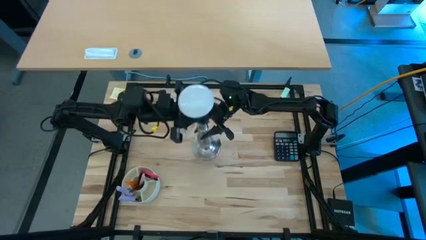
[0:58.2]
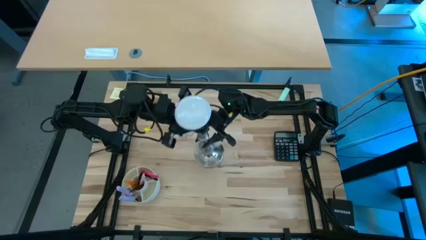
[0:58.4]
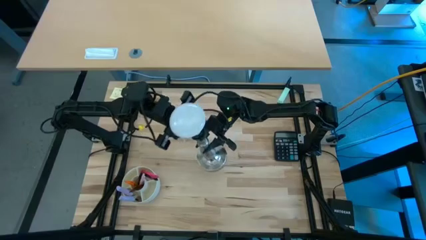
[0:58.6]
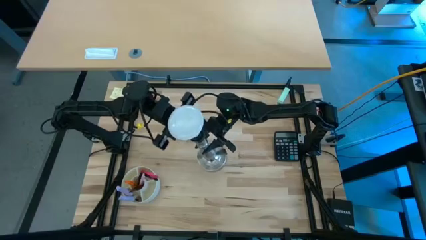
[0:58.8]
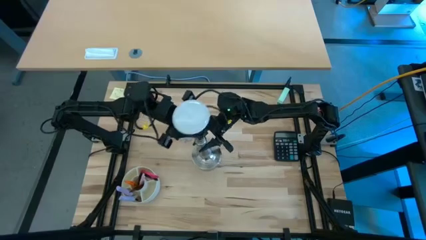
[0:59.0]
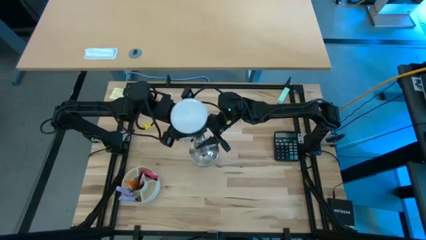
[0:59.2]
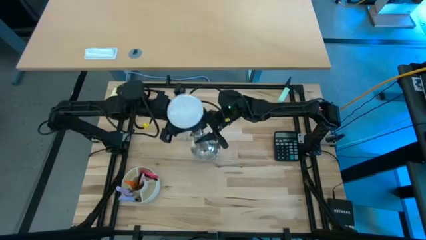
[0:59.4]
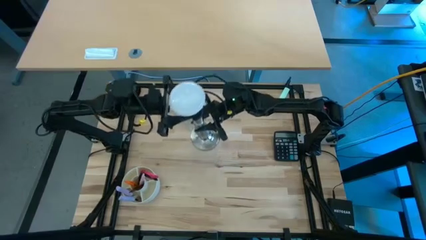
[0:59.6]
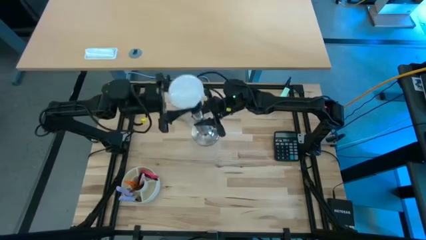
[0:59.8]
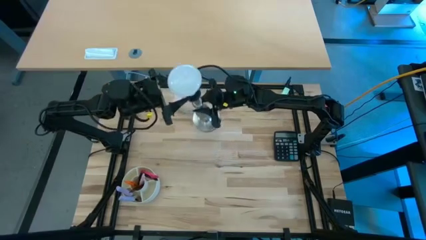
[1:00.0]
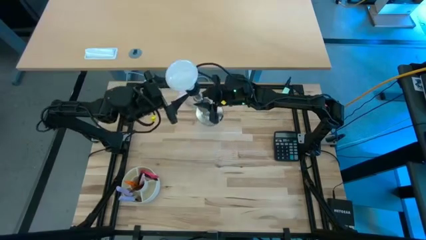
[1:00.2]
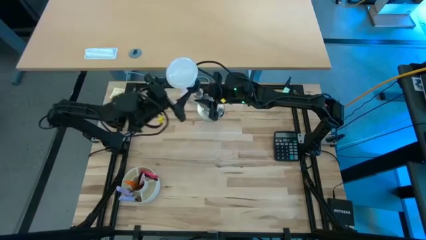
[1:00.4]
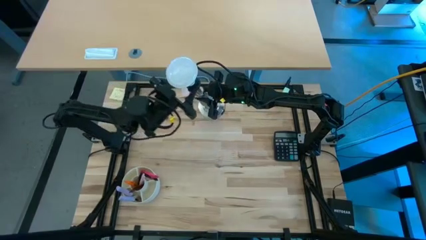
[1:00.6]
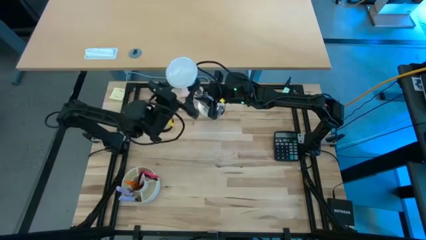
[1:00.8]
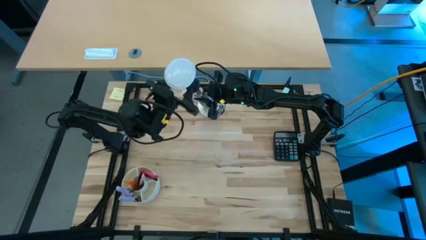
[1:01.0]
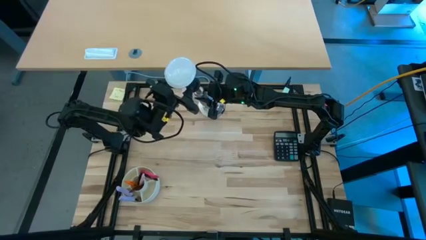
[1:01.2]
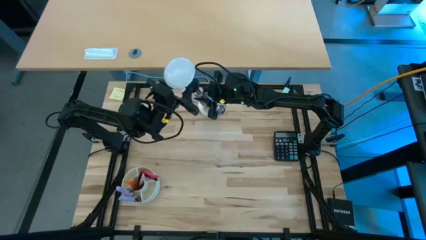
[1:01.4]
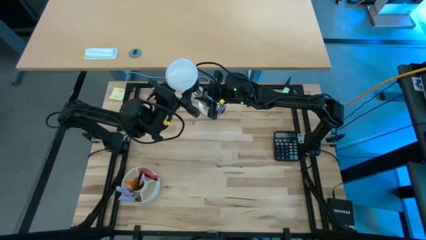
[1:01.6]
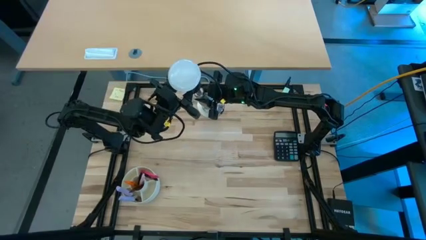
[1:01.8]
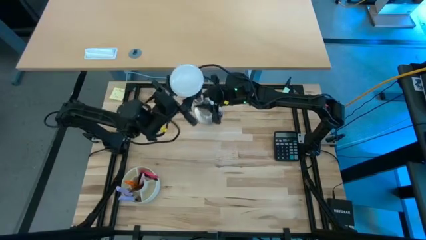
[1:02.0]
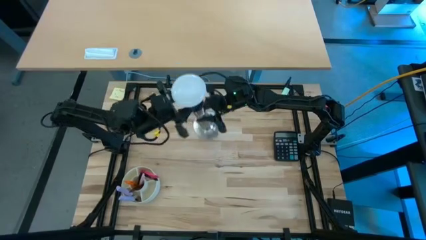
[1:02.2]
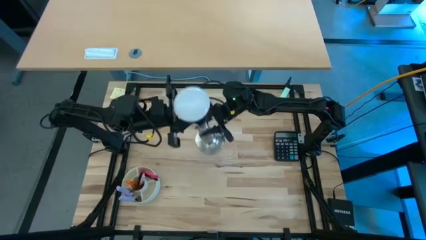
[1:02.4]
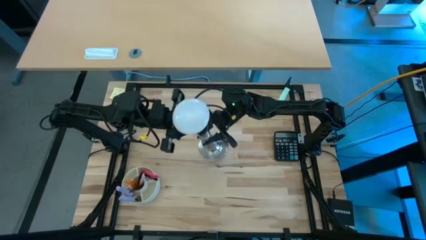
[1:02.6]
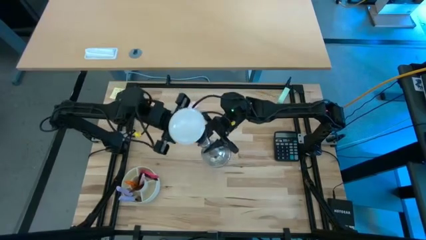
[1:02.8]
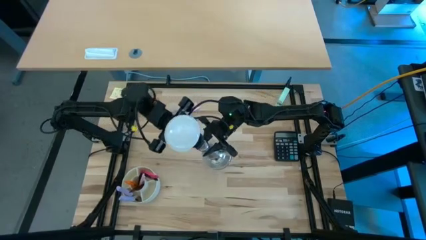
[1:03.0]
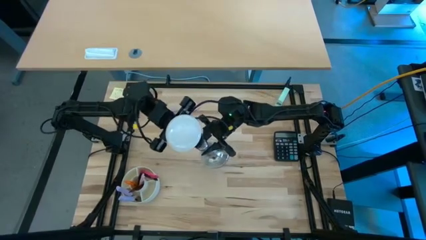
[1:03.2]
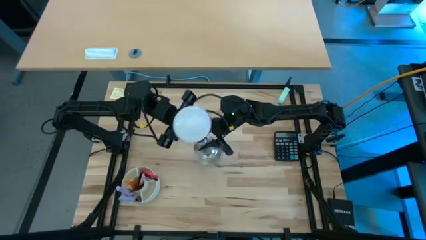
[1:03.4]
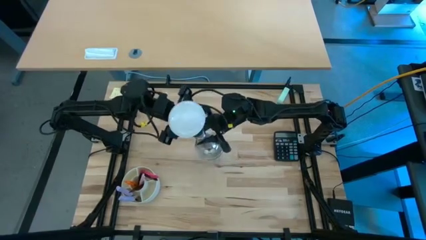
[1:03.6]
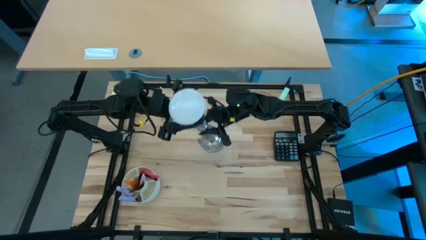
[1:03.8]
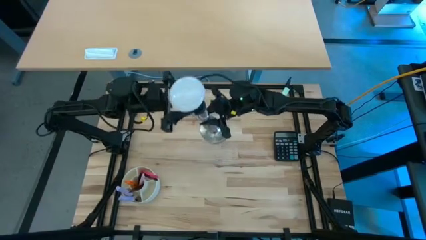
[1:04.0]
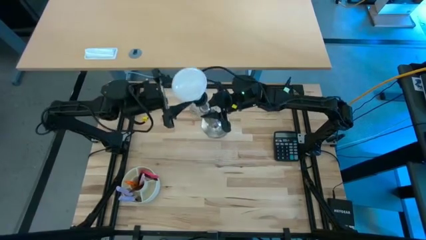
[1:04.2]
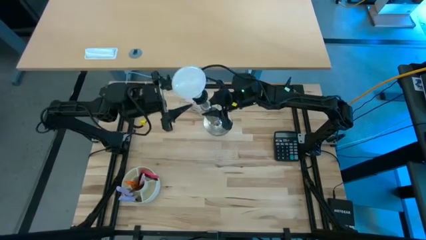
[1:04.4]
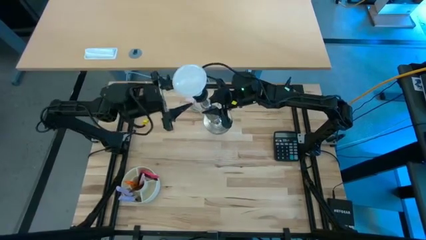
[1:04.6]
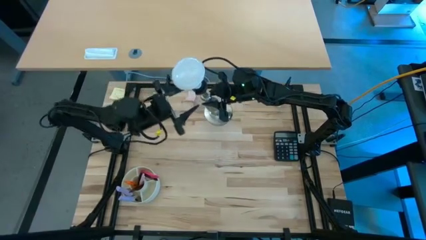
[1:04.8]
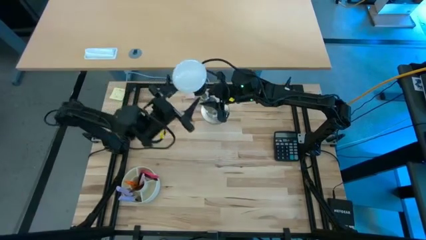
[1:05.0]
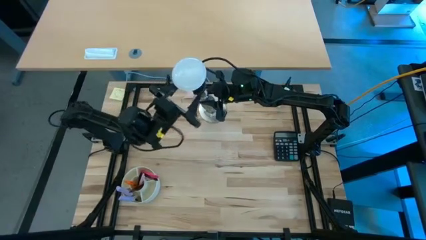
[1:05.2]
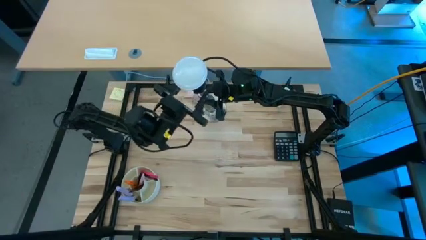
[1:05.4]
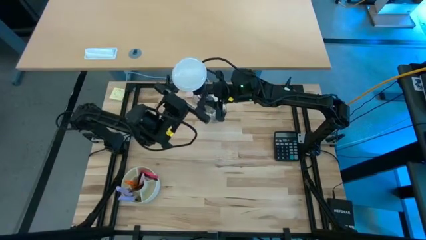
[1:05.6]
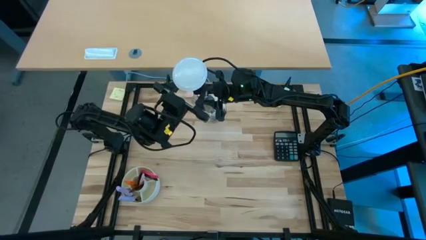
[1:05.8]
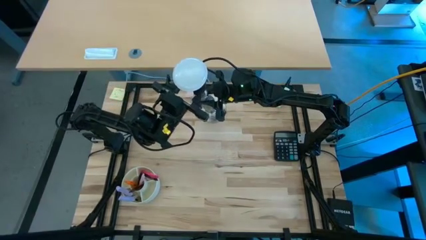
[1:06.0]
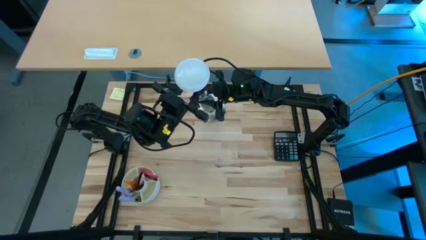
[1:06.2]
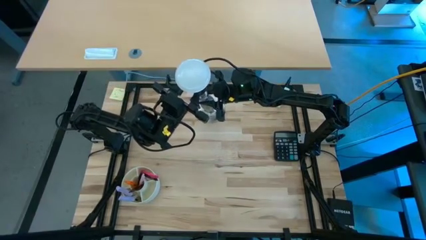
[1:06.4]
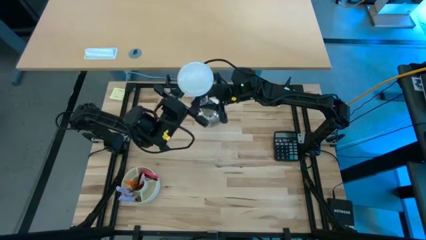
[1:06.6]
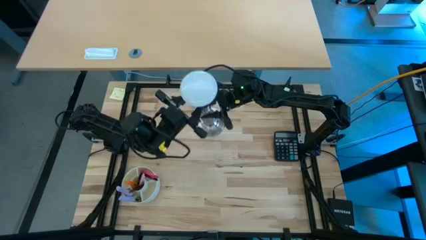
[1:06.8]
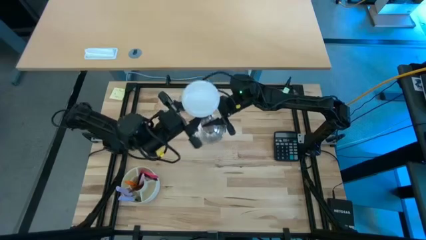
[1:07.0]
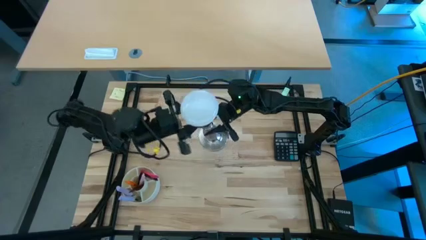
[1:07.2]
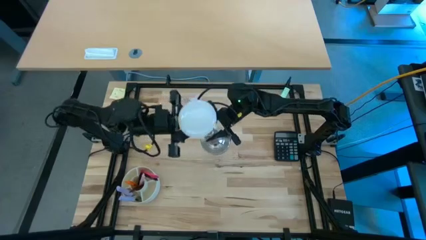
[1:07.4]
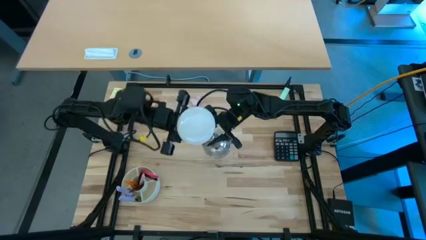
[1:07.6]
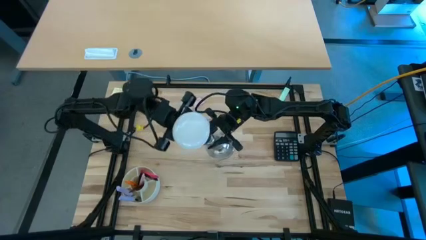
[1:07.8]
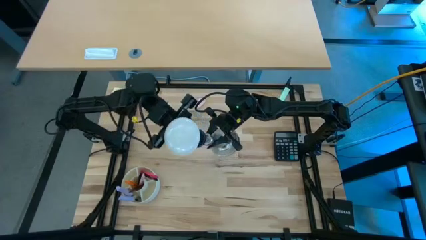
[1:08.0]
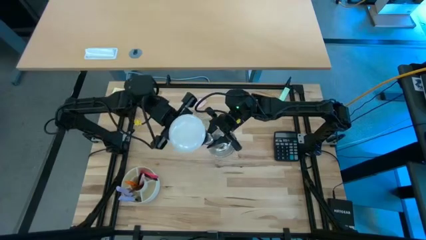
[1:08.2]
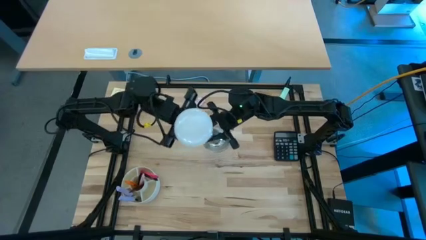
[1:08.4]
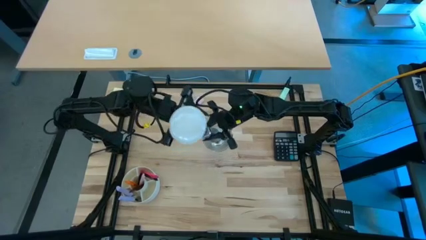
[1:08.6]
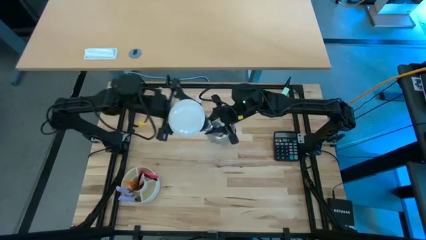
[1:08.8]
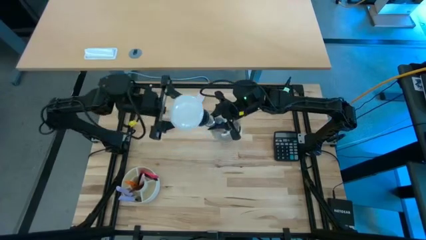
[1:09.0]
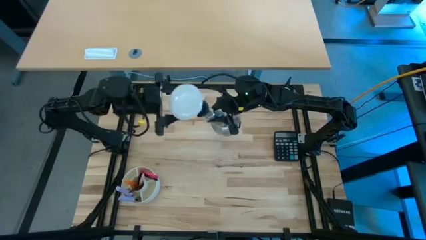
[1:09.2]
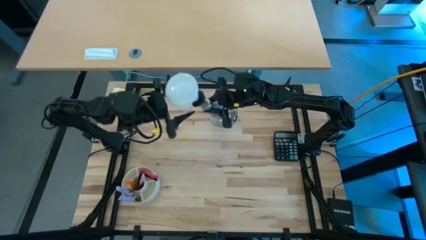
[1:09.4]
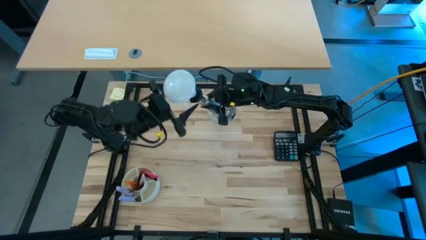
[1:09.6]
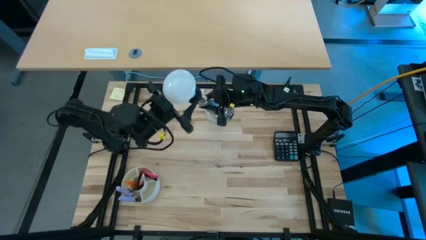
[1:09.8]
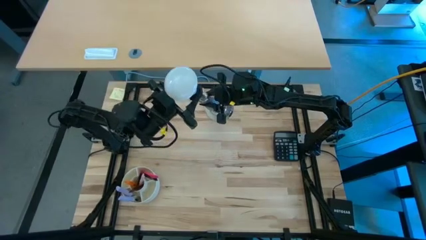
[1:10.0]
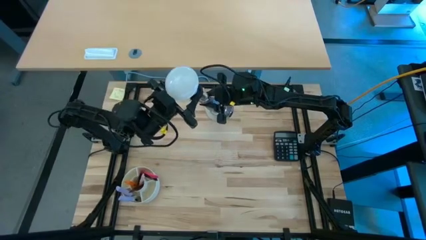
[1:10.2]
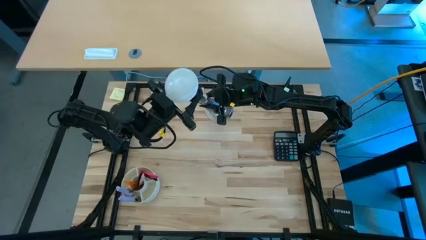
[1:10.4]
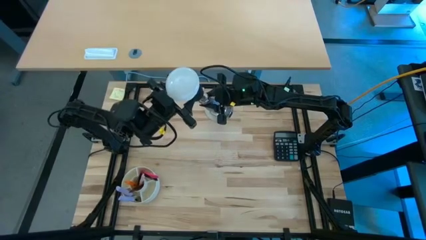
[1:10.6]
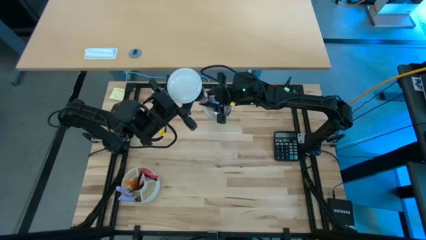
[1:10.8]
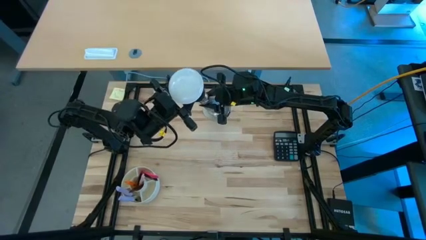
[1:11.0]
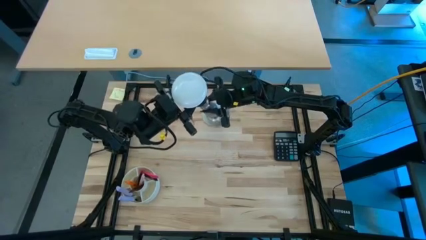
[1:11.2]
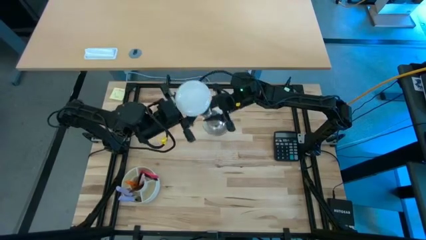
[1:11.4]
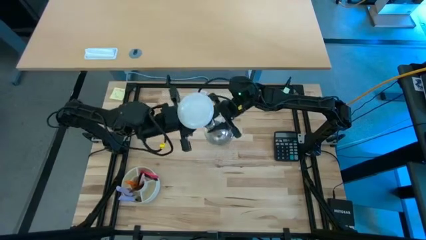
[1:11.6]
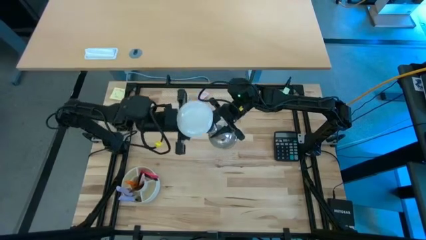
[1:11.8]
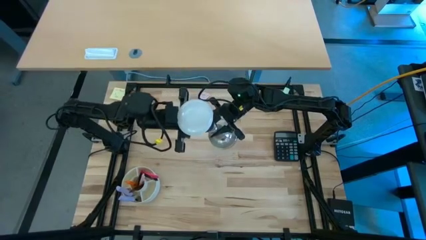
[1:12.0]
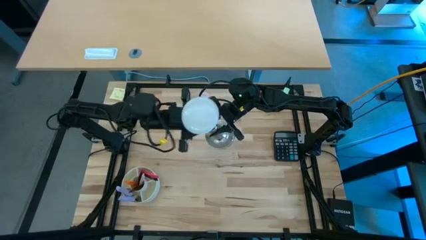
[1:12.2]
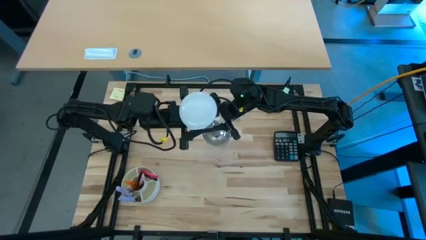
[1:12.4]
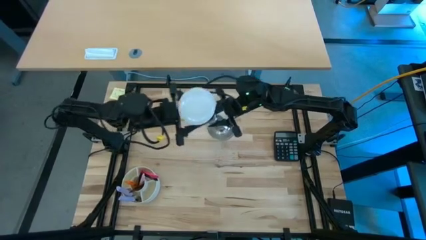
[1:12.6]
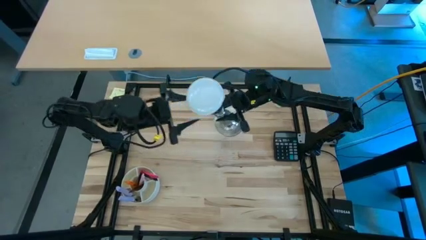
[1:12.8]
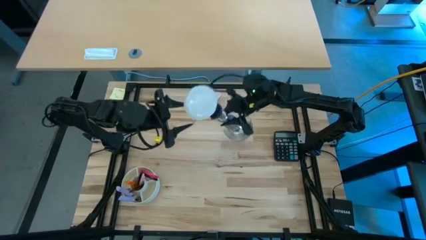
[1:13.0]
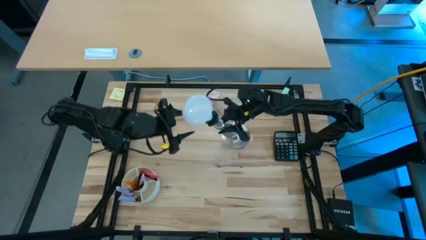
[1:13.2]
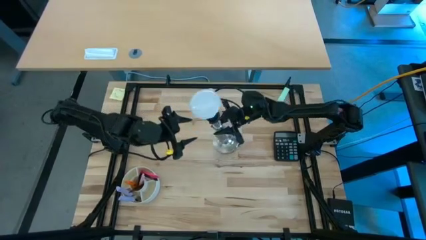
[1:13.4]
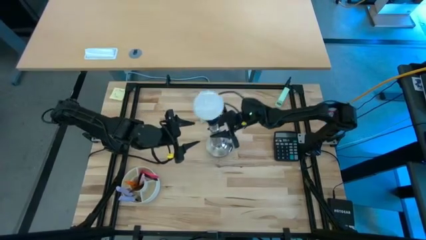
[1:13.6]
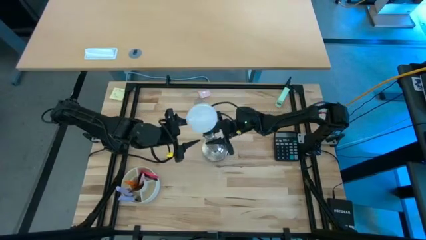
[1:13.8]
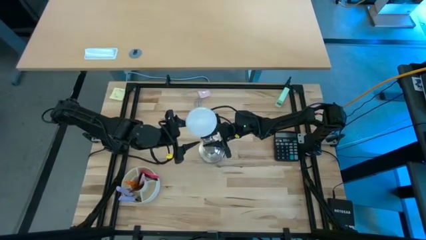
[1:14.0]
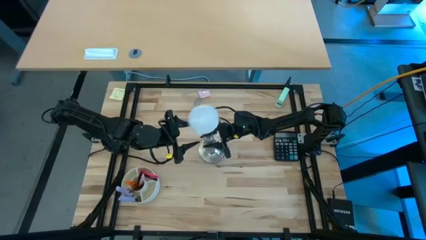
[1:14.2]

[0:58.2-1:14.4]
Task: Screw lightbulb
Insert the white lightbulb on the silver lamp
